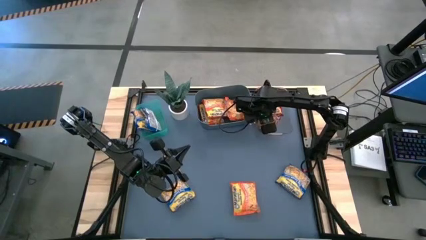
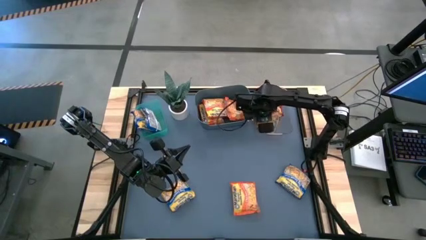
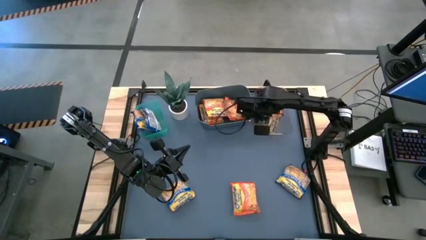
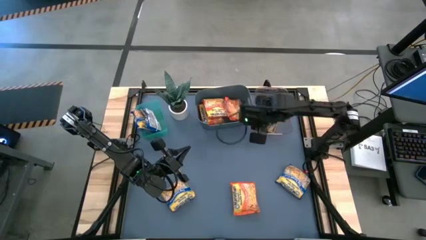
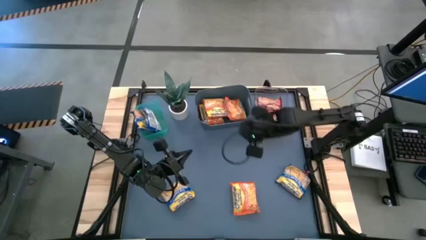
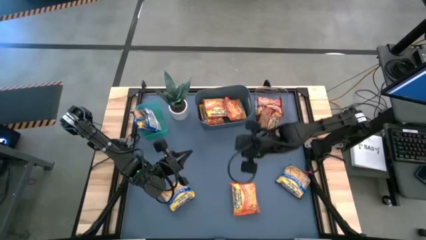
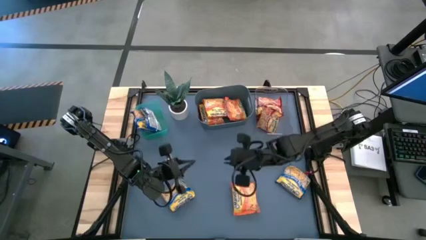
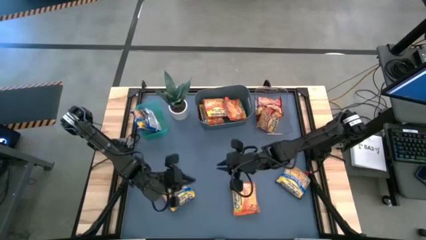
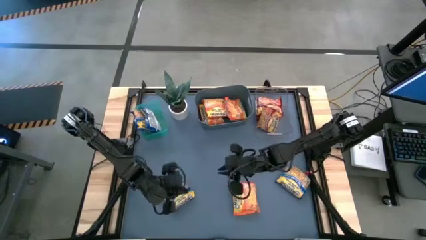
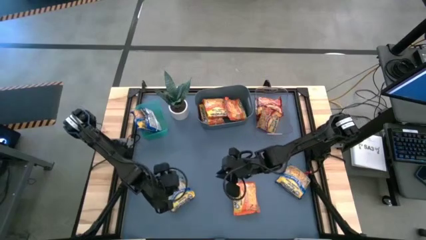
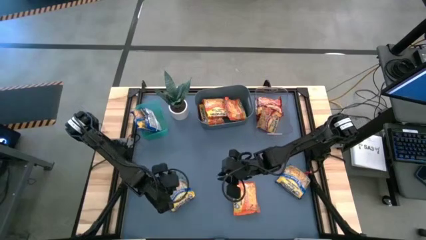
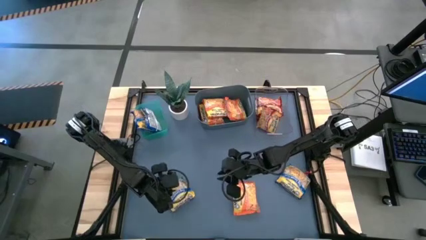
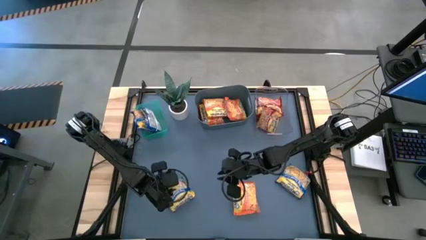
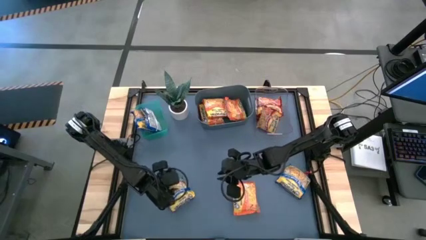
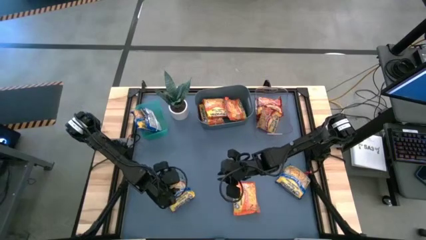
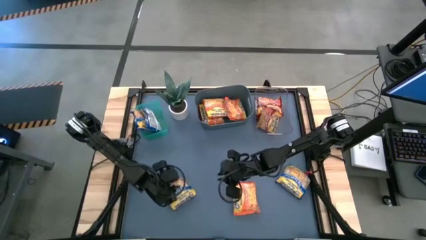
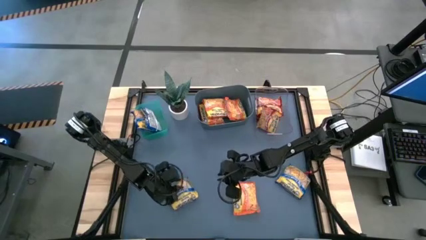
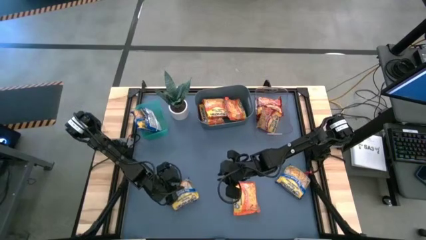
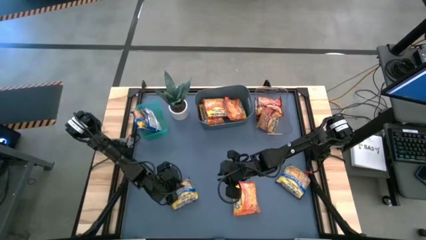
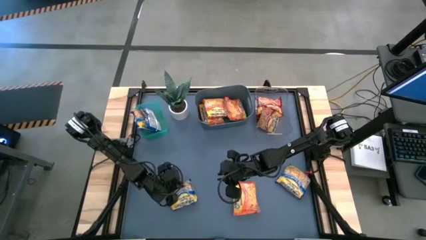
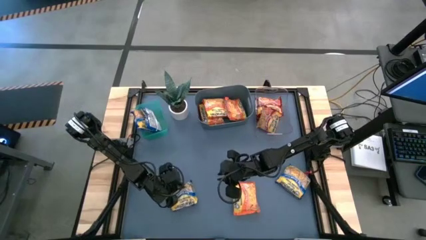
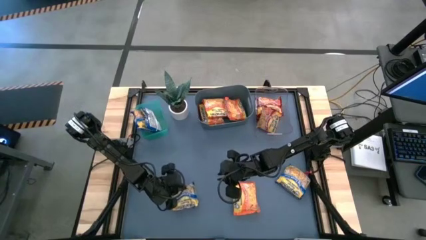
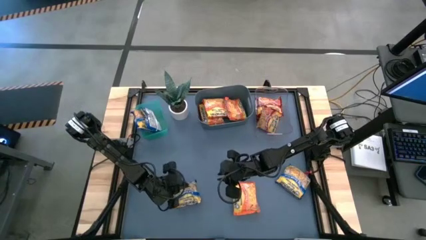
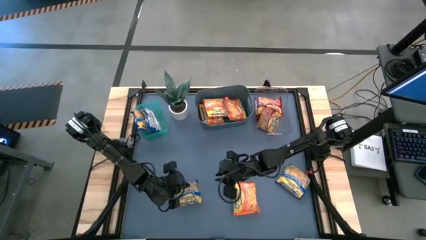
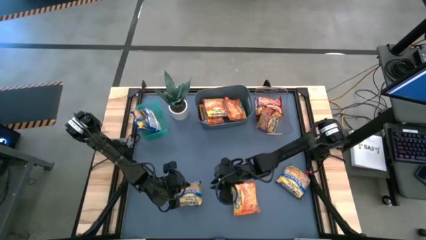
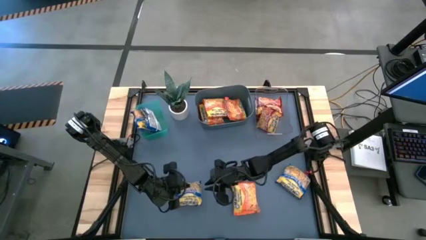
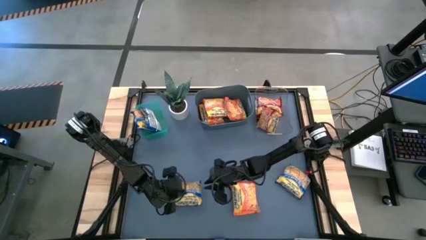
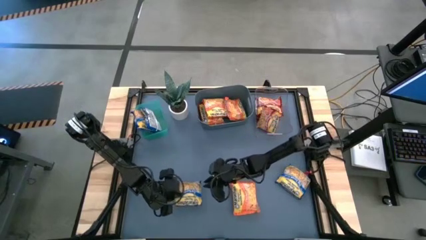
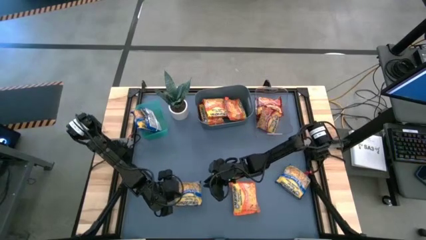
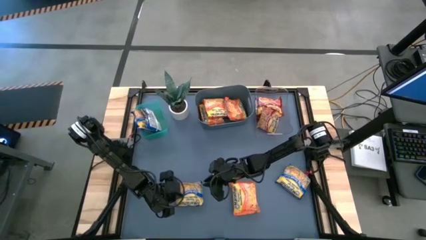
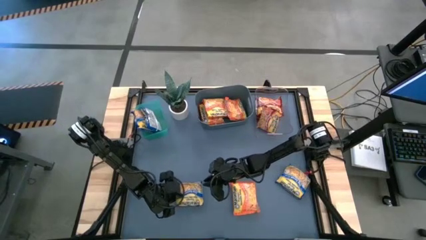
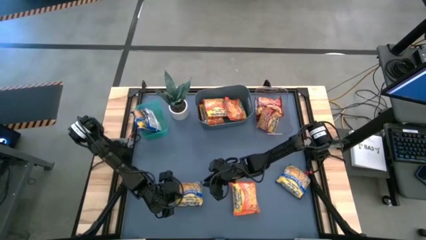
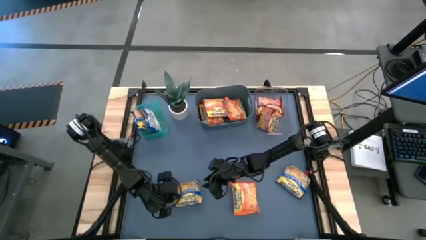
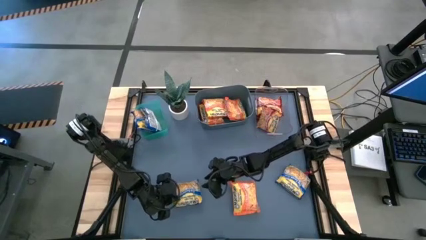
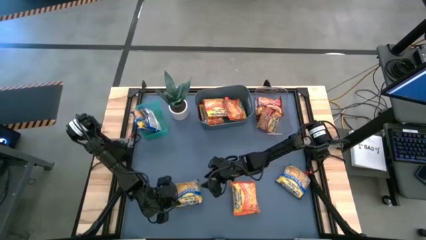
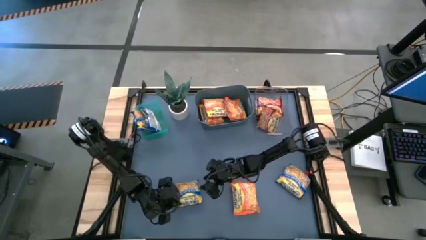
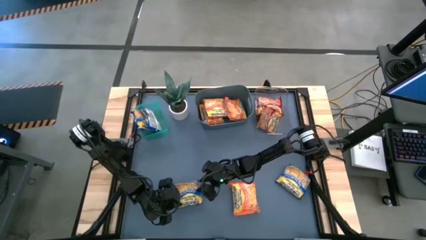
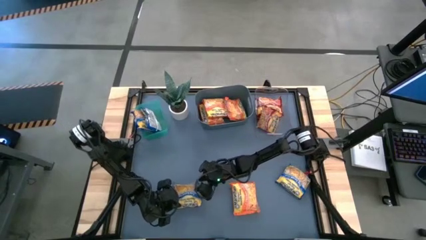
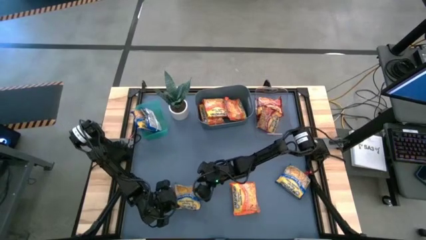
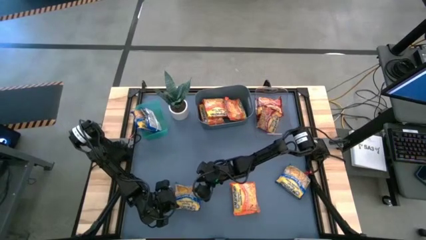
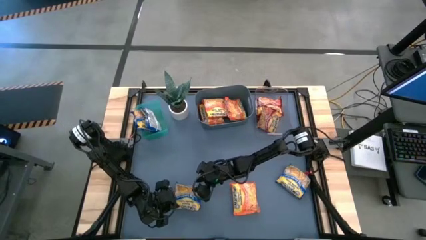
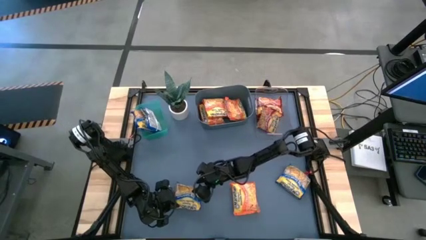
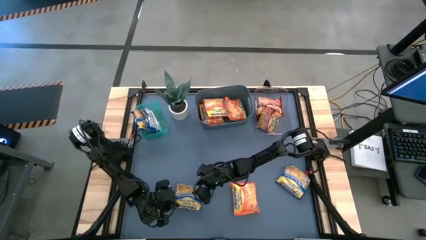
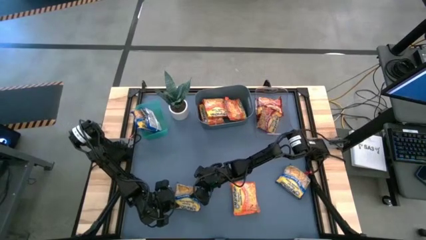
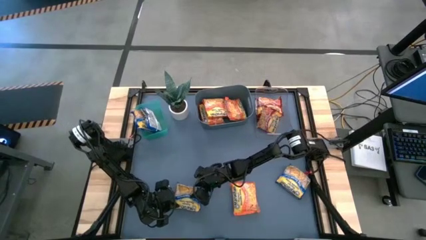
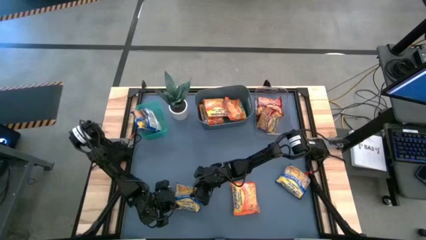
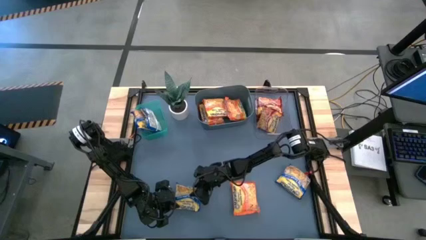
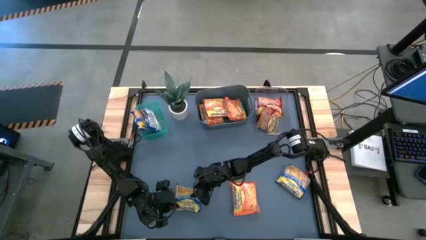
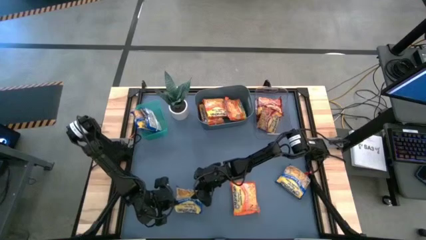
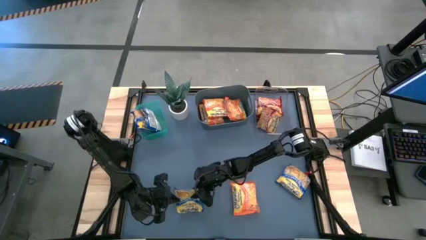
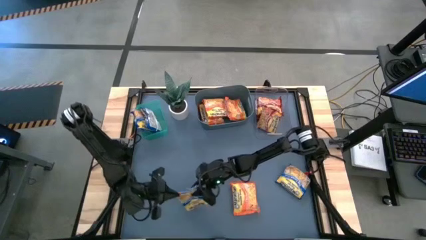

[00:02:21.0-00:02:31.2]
Task: Sort Maruchan noodles
Put the blue noodle pack into the green bin

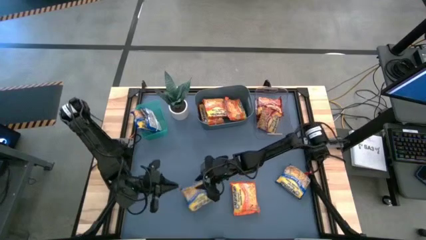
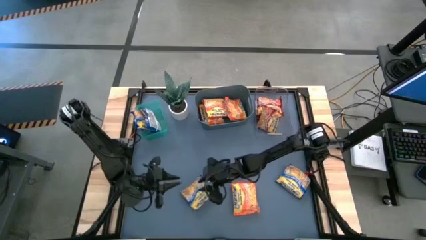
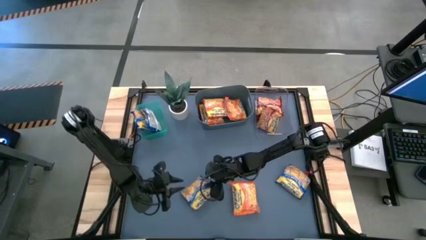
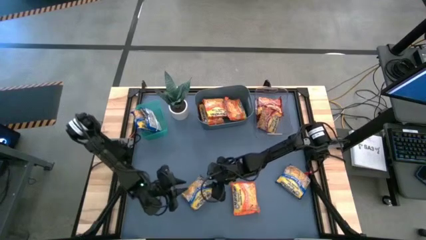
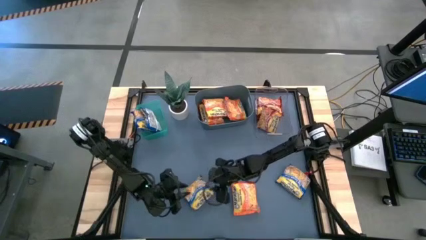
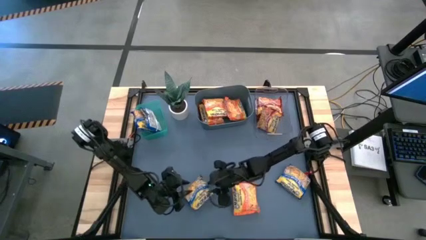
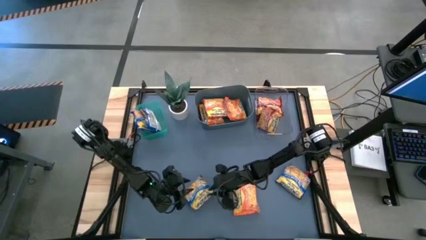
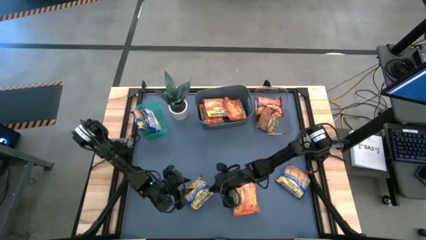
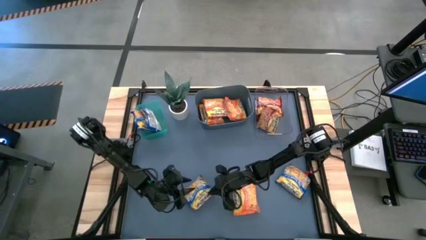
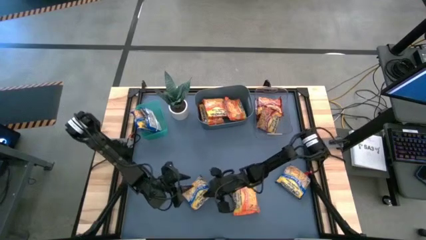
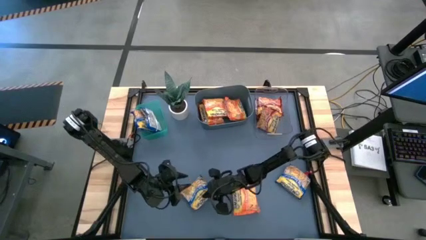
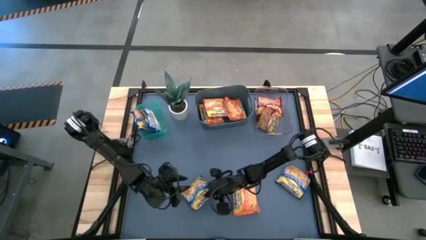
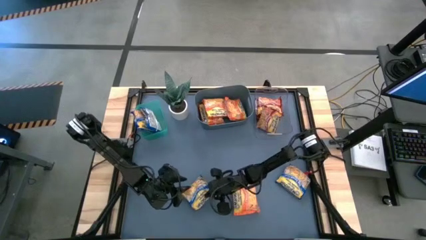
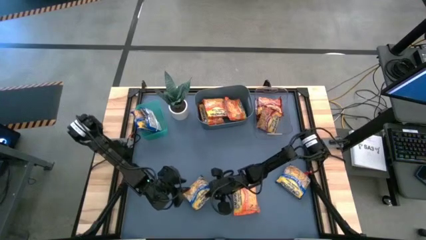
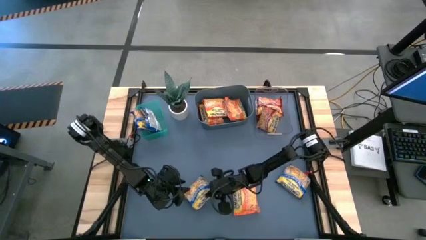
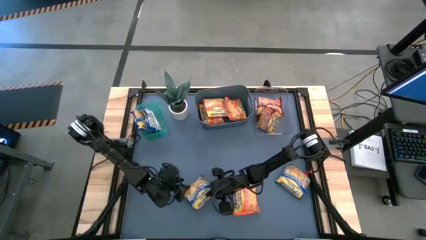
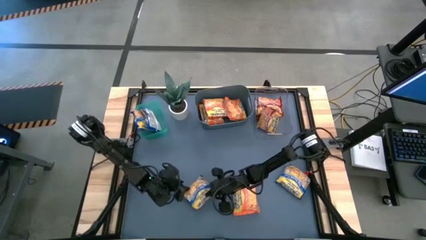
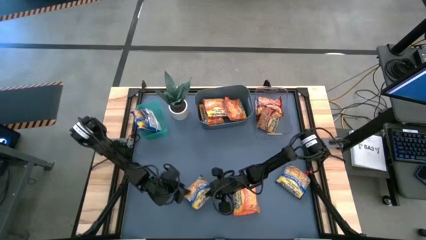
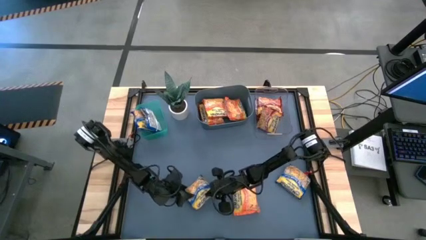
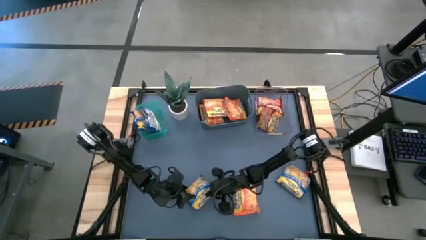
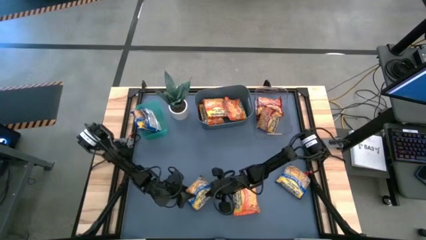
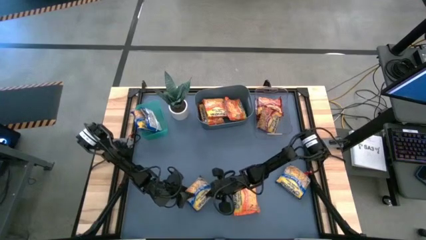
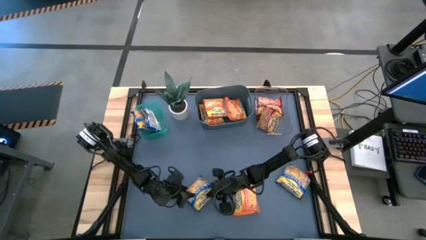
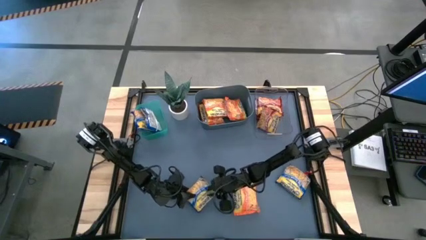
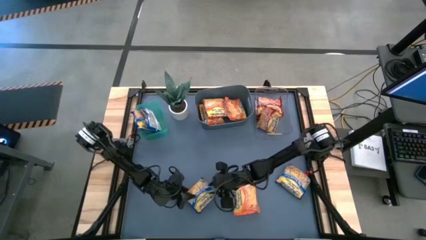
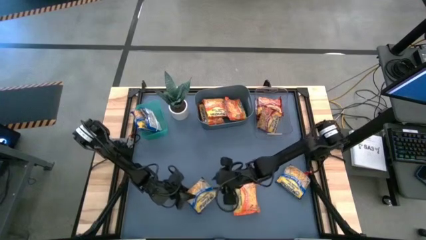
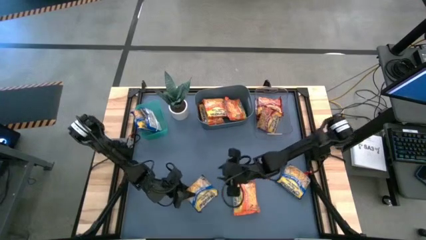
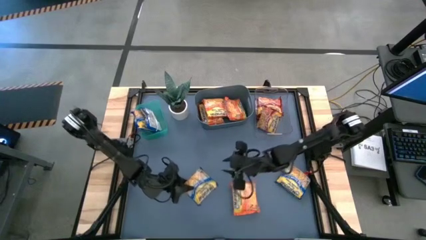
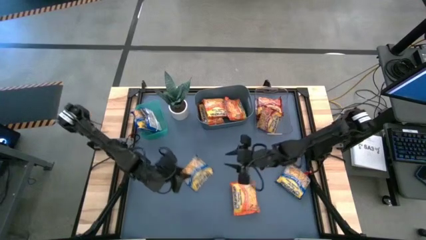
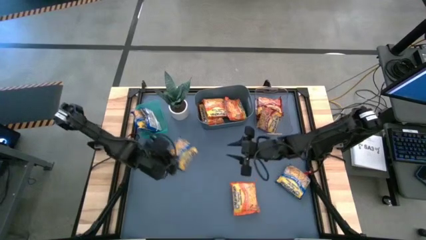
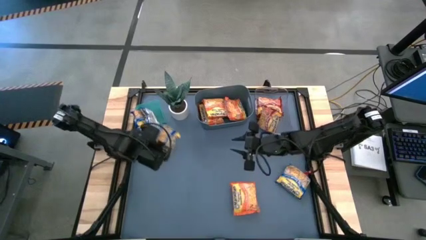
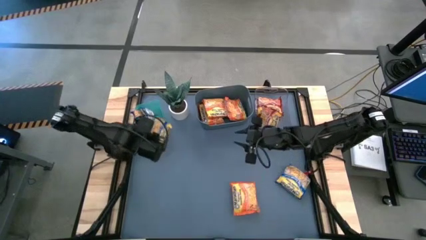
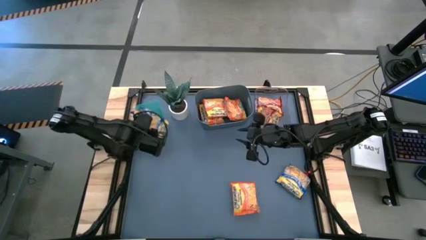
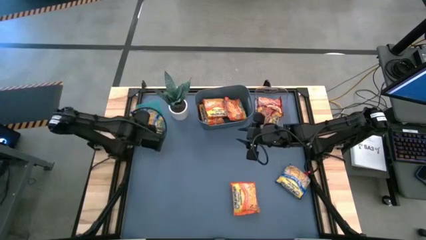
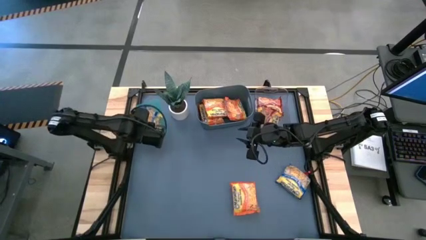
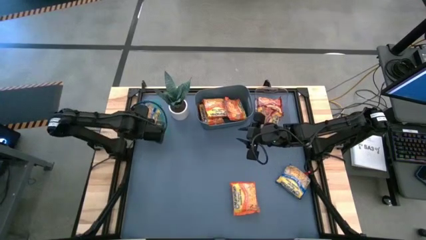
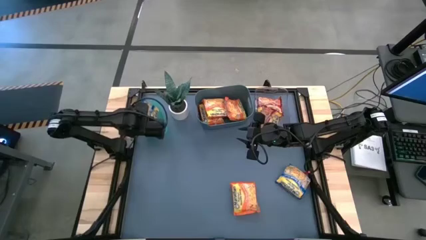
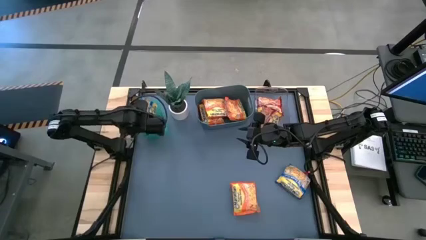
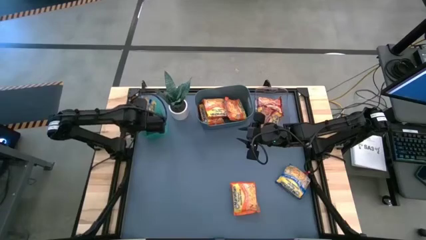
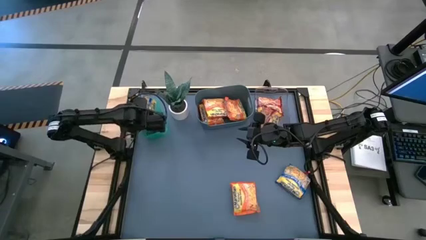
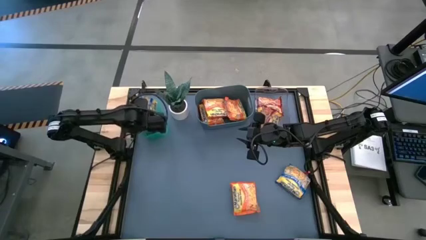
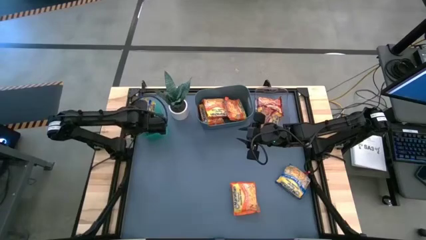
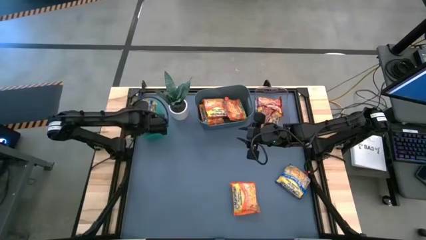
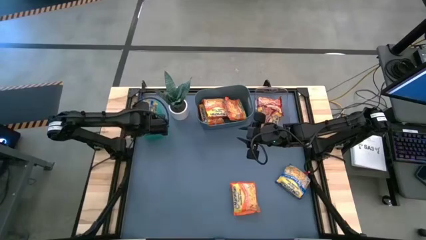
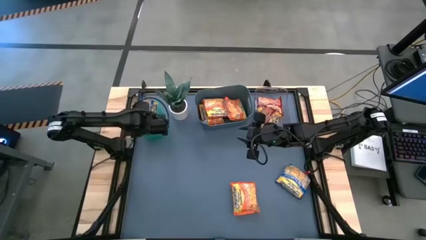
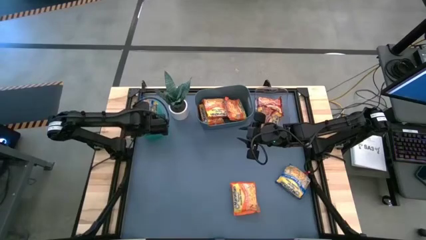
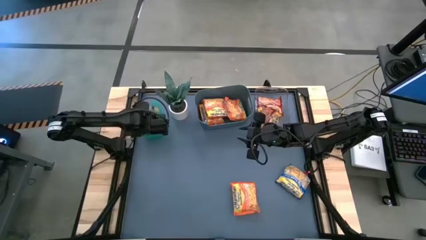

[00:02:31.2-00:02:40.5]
Put the blue noodle pack into the green bin
